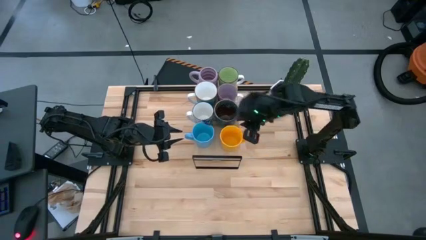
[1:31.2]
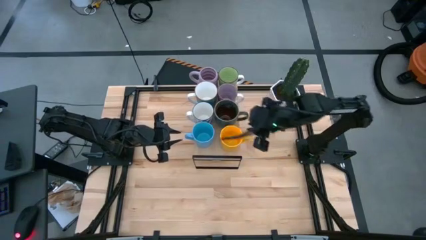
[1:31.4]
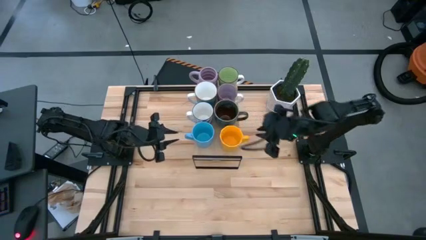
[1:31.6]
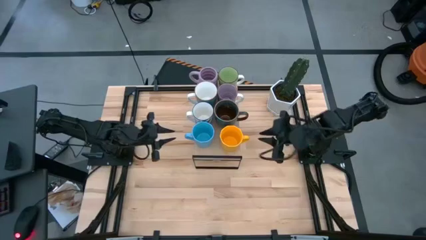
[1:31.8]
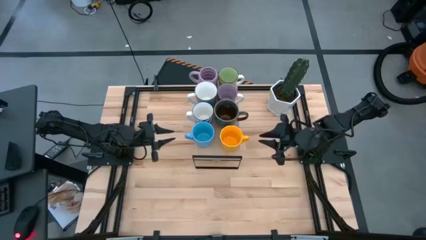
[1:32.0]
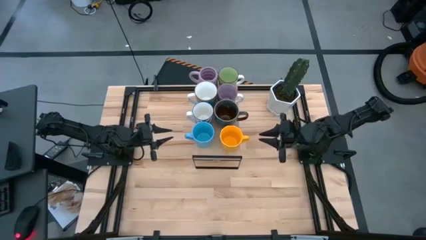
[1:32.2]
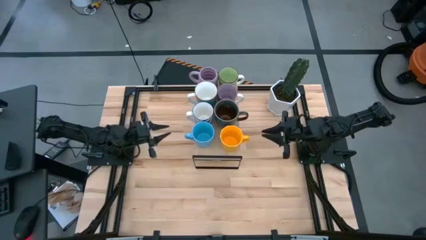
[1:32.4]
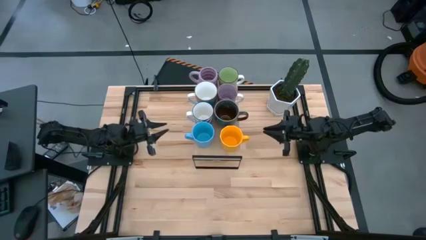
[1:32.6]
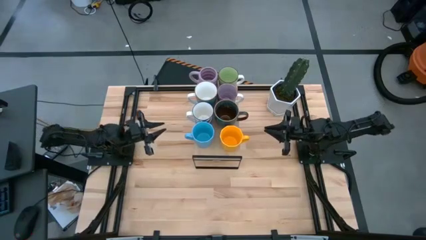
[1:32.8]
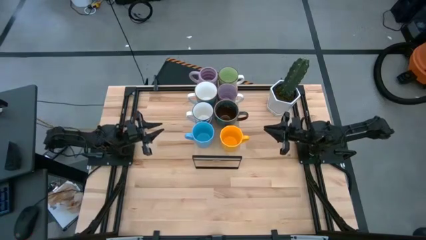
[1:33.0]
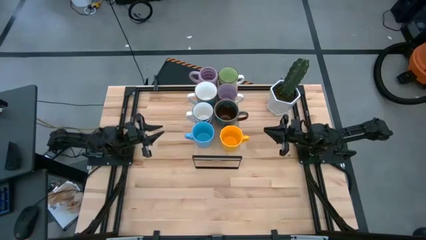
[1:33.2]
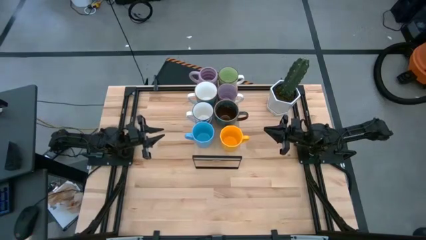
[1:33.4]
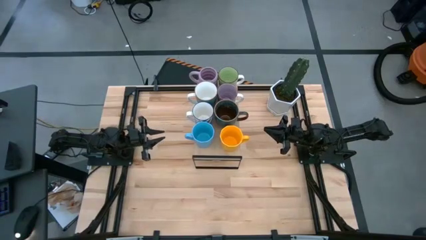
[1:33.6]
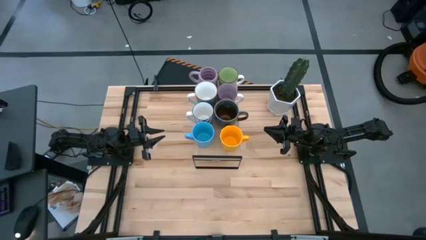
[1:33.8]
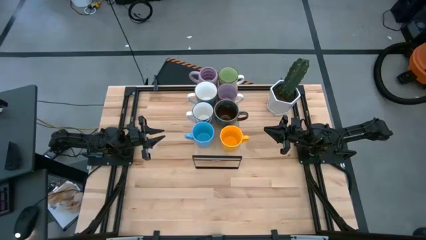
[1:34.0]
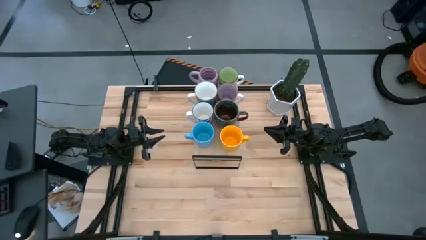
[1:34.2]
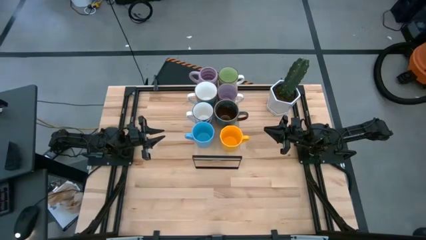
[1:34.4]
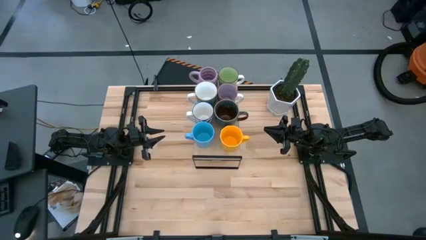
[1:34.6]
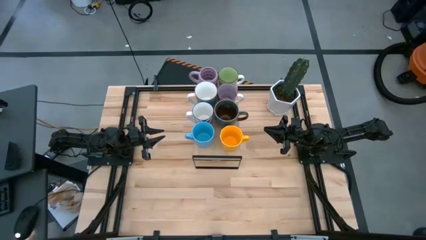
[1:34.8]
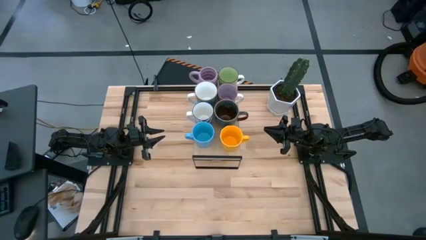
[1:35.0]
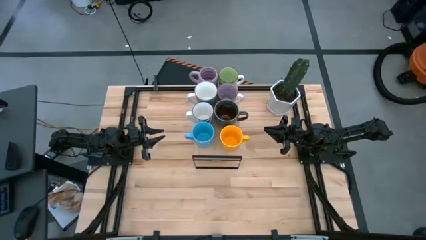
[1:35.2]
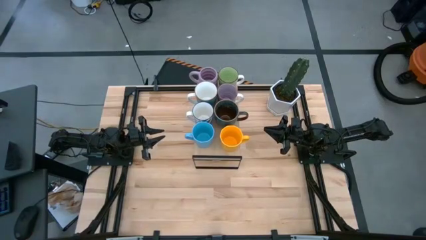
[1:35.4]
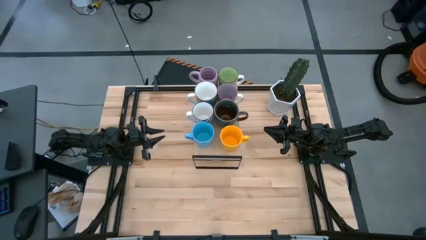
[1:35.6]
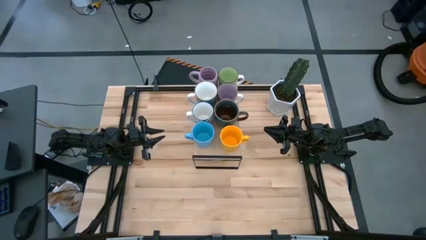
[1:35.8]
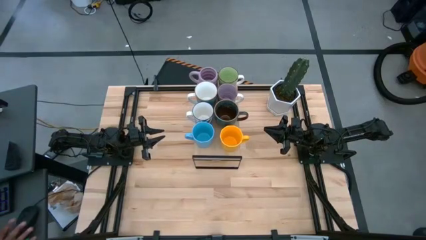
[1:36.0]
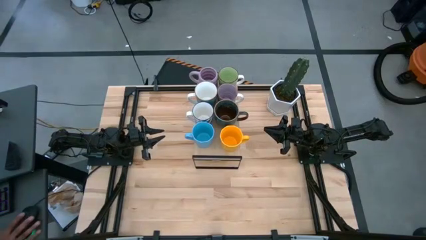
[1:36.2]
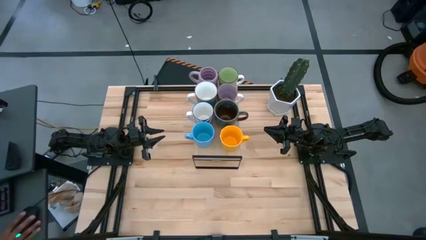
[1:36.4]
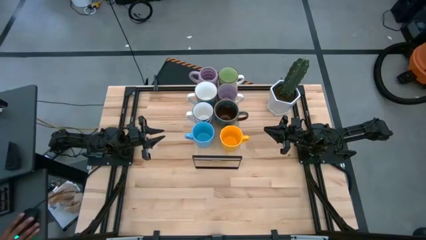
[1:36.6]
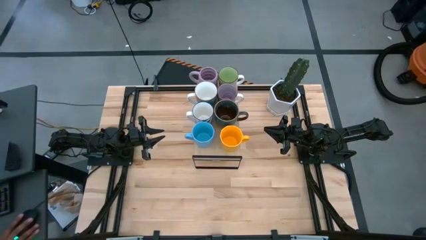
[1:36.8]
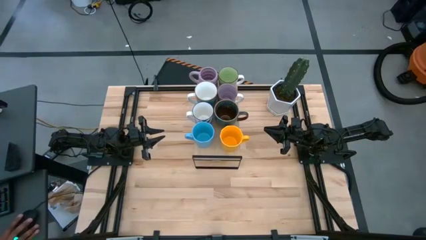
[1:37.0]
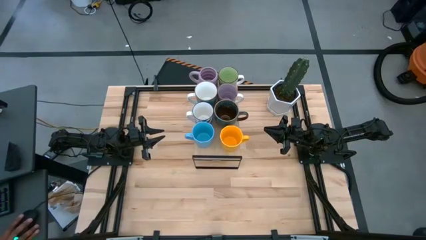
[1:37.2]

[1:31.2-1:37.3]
Task: Place coffee mugs
Return to Home Position

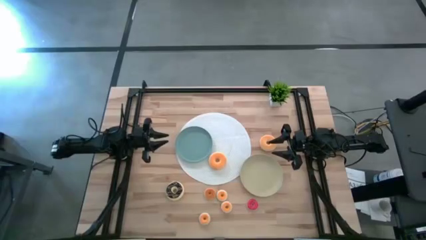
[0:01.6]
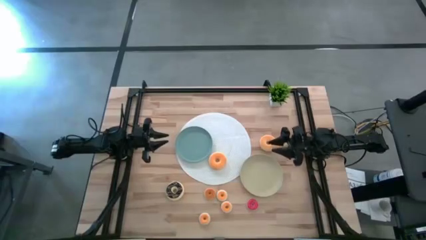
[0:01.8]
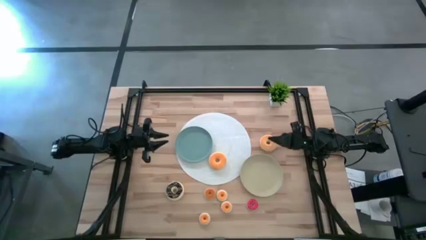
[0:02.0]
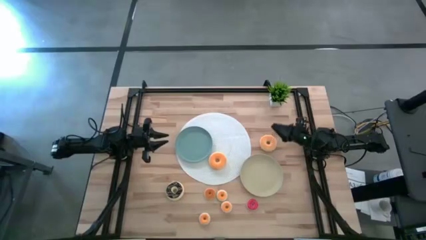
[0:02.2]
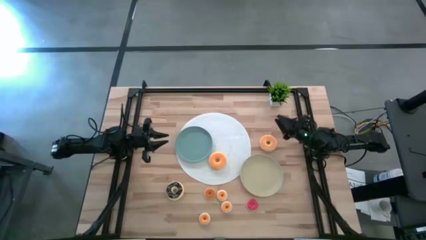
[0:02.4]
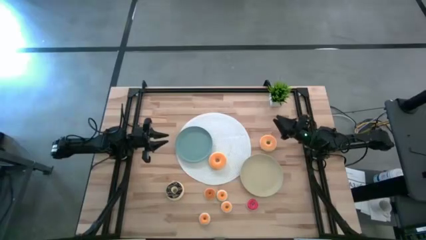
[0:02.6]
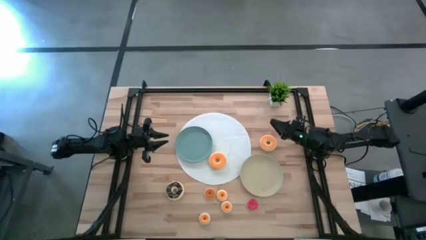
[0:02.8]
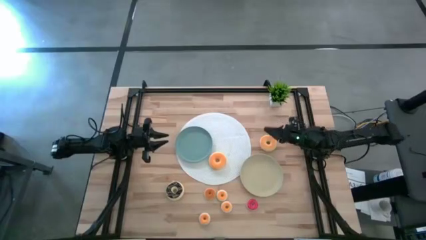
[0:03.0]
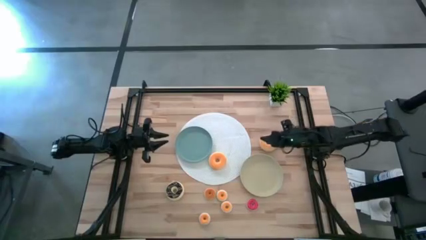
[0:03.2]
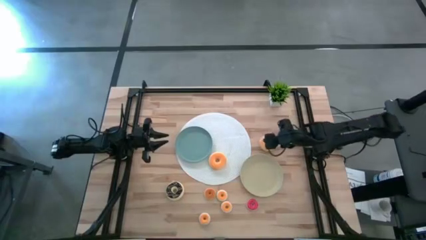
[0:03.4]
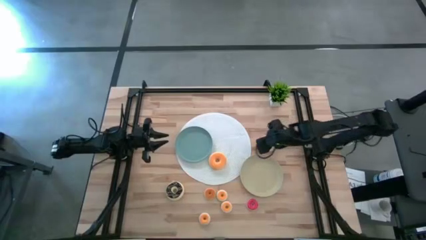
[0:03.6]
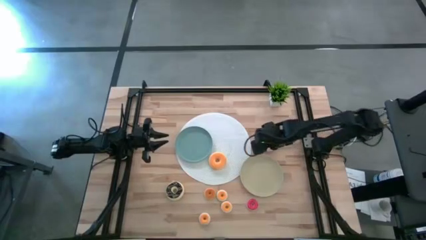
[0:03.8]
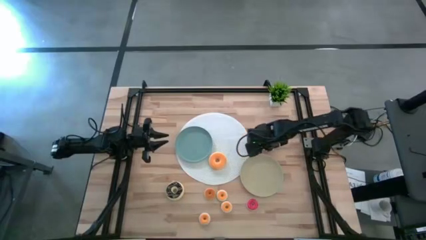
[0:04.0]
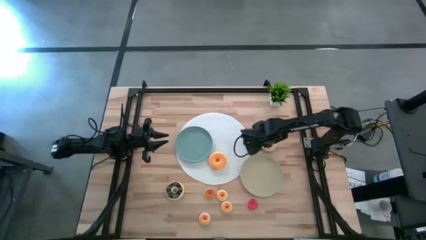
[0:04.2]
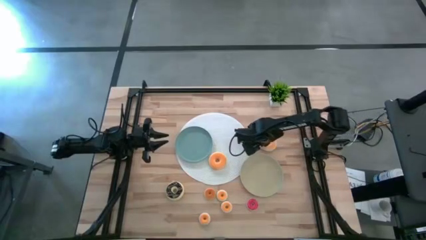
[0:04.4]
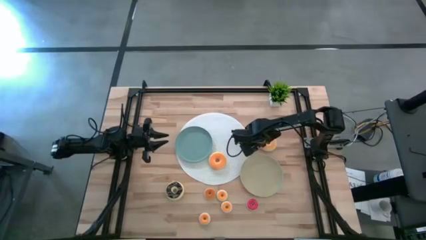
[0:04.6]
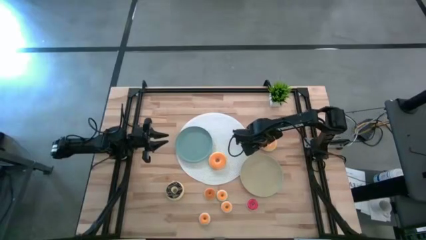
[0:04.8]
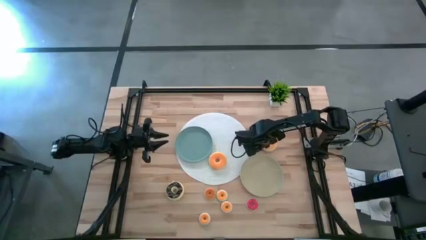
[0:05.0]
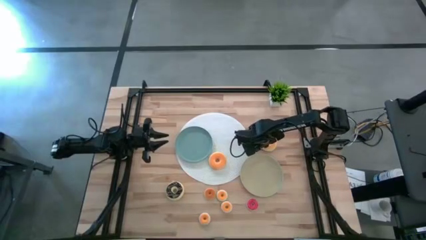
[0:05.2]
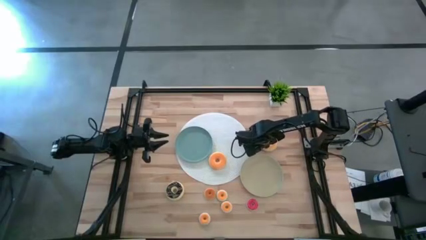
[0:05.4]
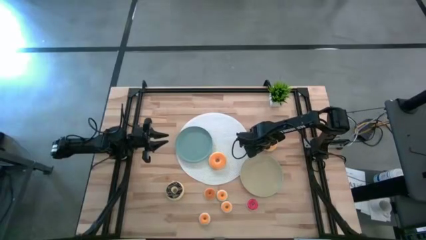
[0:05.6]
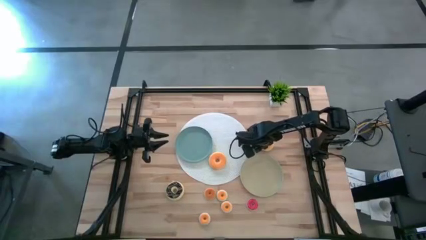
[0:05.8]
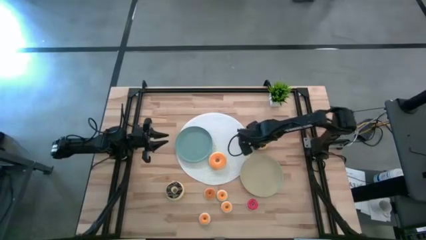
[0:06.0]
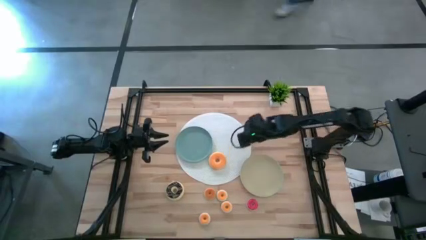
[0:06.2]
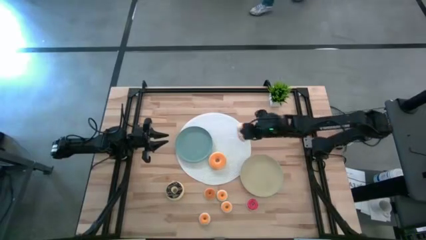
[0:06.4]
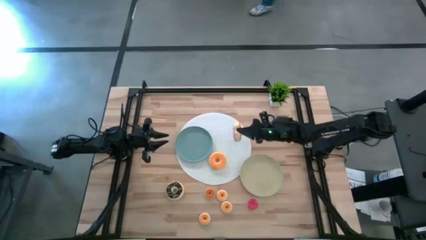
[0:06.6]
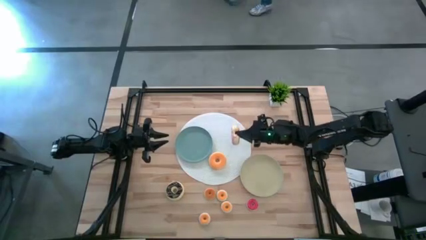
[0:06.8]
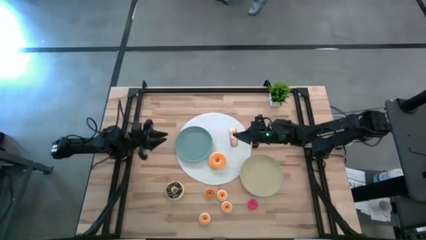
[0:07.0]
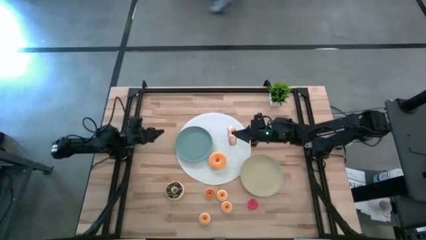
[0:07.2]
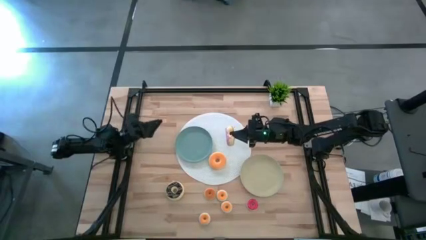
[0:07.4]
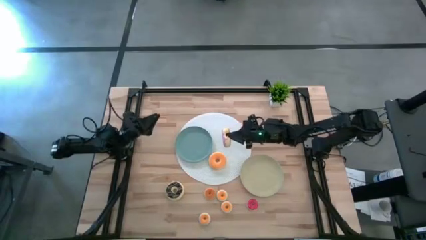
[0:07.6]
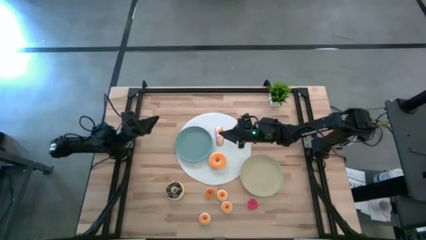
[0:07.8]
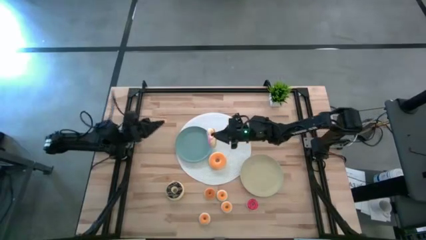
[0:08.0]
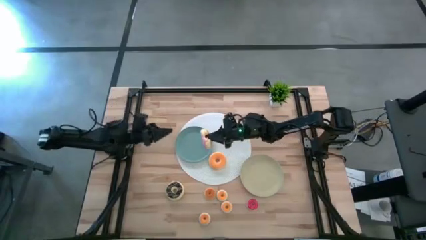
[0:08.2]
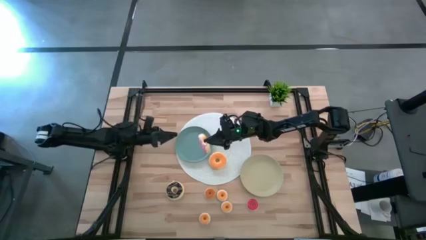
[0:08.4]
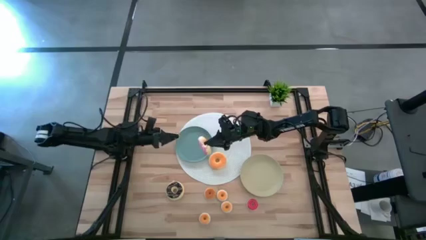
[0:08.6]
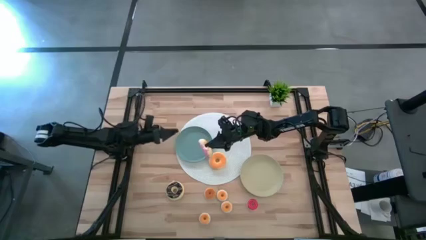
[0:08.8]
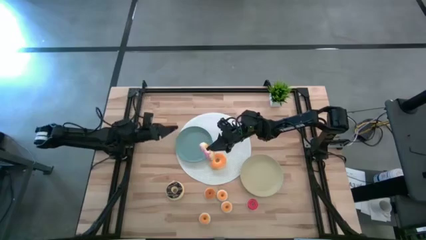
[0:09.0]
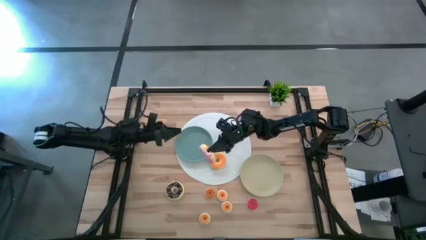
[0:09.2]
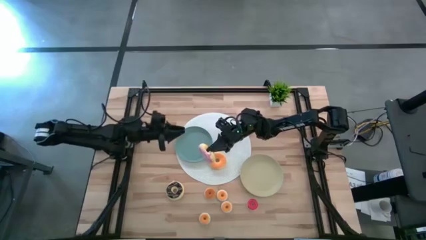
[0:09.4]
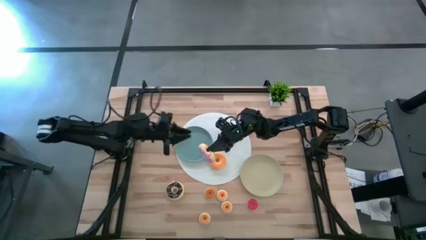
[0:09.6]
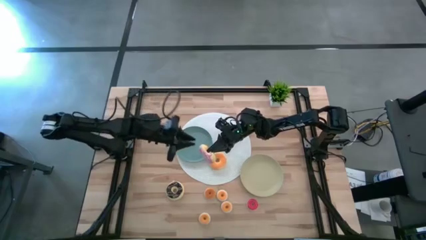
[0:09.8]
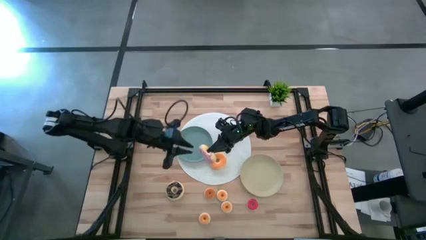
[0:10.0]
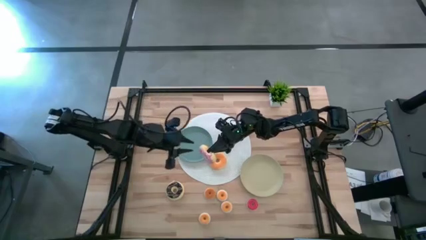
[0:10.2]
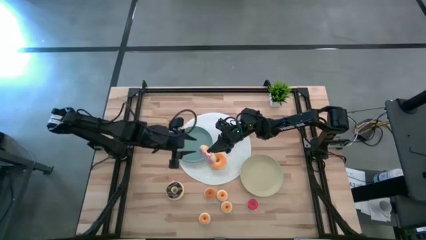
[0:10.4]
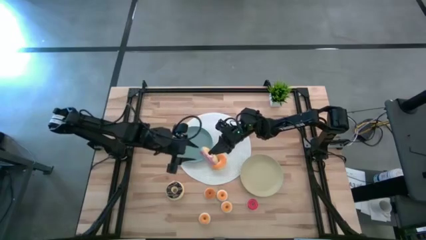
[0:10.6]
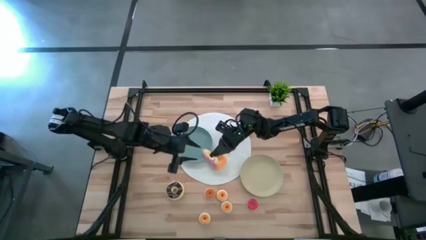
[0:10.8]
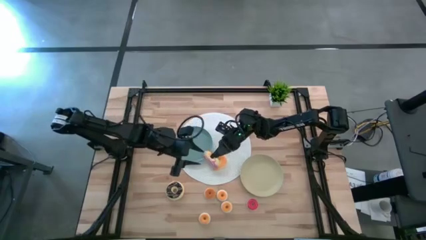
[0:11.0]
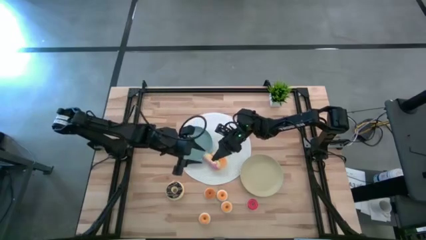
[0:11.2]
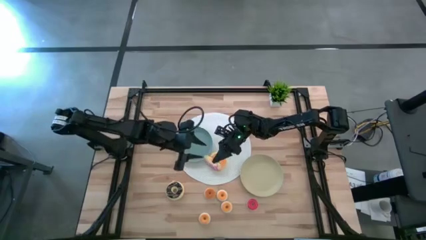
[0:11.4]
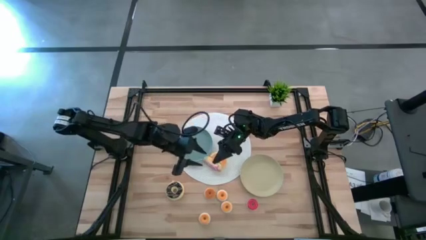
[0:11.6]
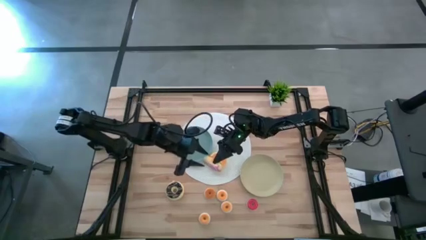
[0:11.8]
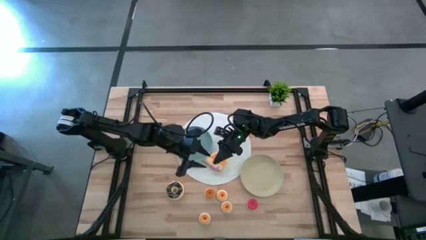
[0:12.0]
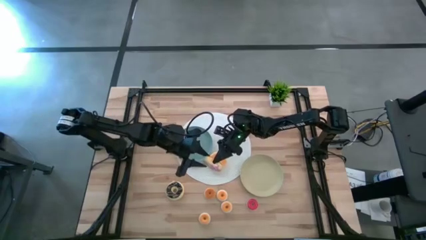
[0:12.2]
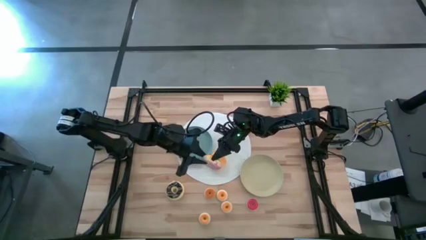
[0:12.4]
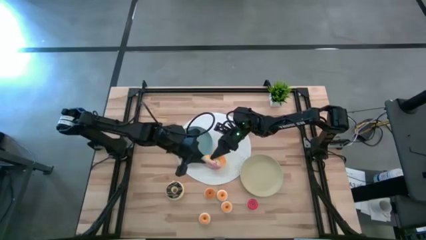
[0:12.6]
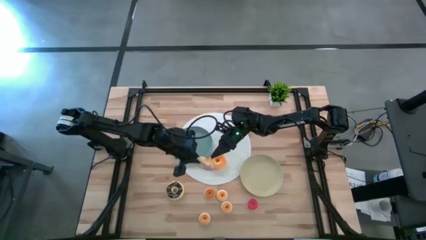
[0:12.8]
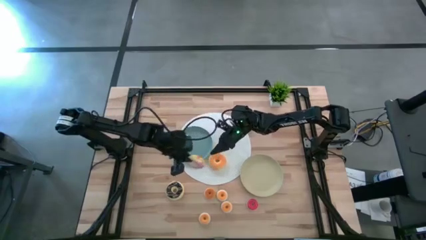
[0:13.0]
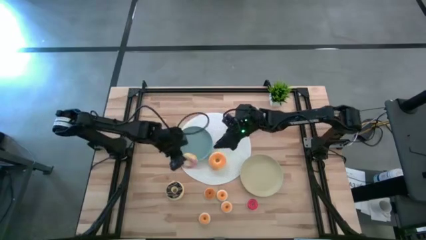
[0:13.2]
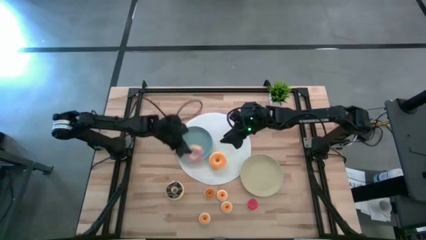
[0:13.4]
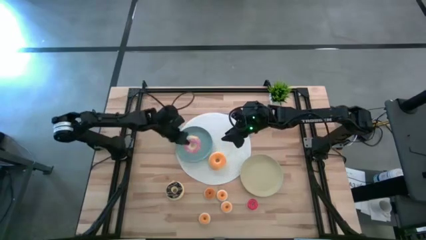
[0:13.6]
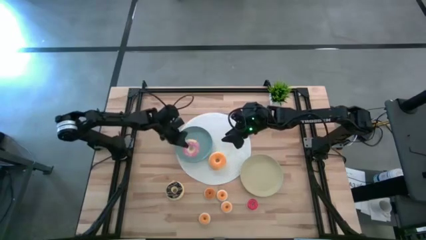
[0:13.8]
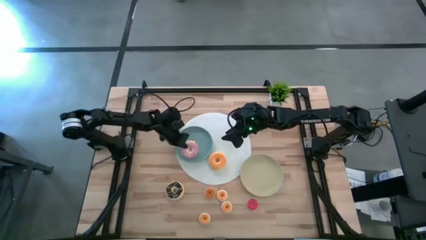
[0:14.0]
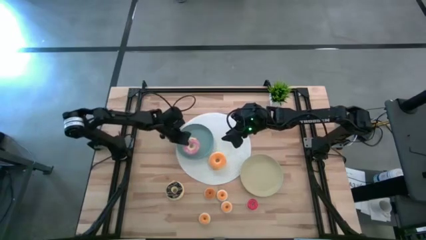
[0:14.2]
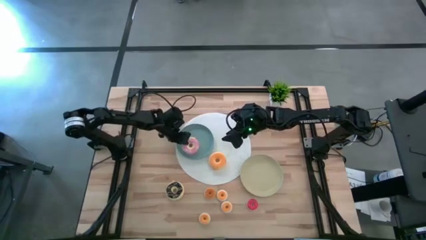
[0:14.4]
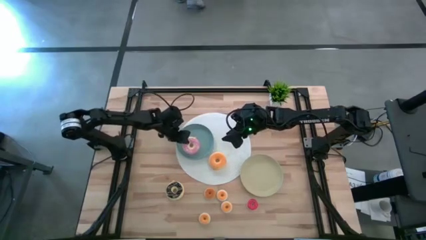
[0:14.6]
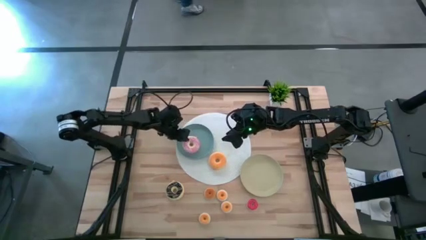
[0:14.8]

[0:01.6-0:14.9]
Task: Pick & Place donuts
Put the big pink donut on the blue plate
